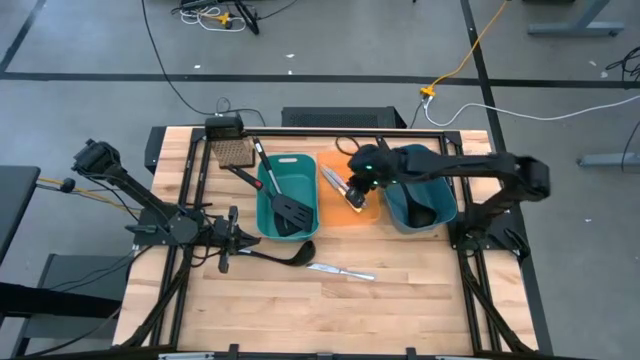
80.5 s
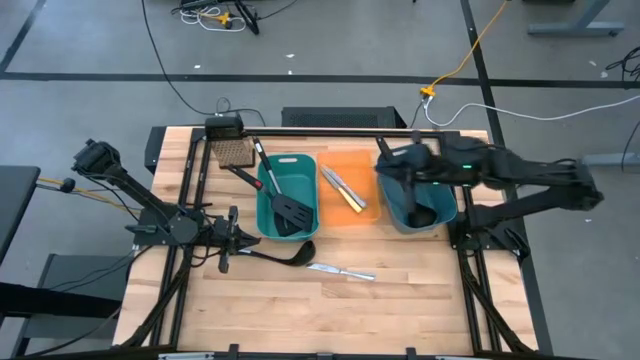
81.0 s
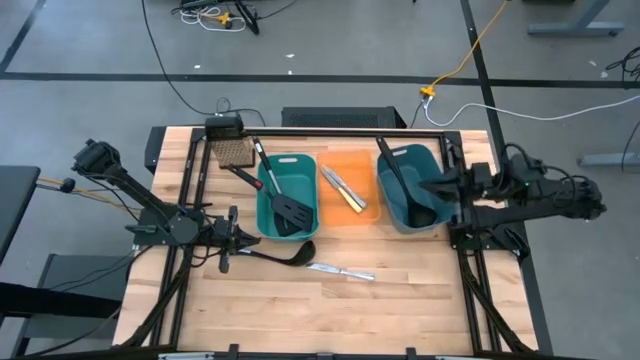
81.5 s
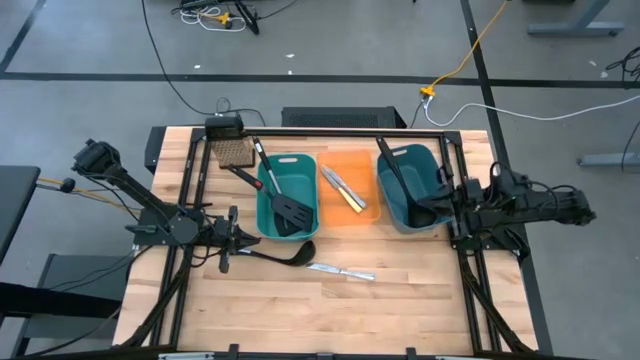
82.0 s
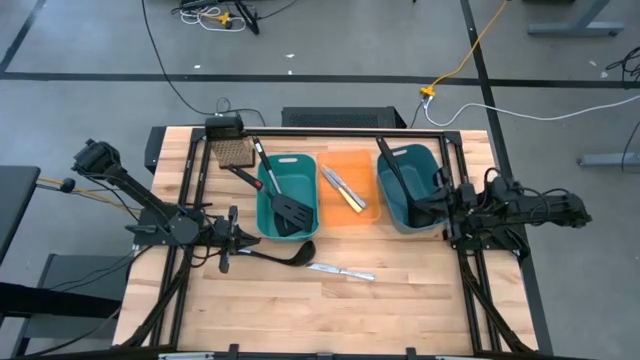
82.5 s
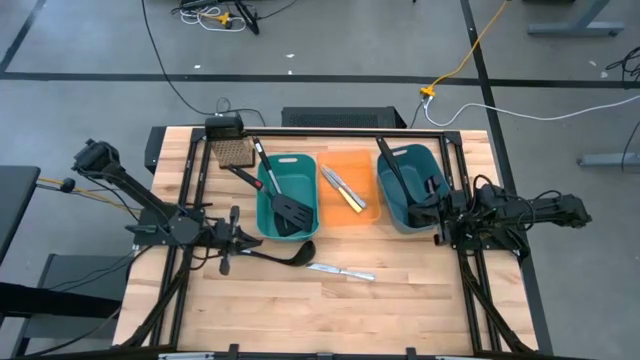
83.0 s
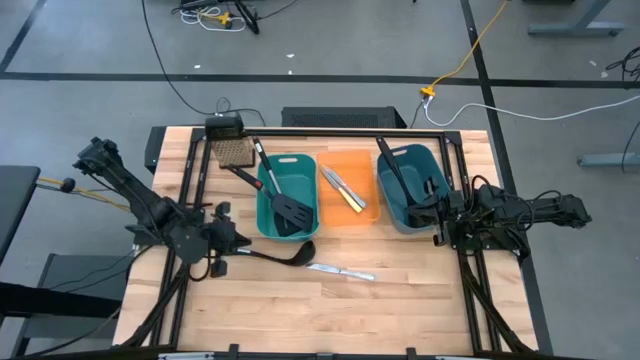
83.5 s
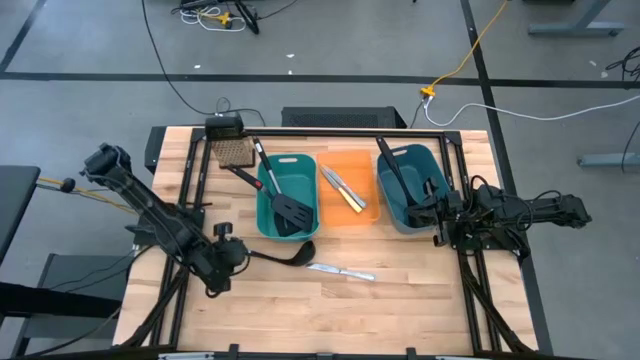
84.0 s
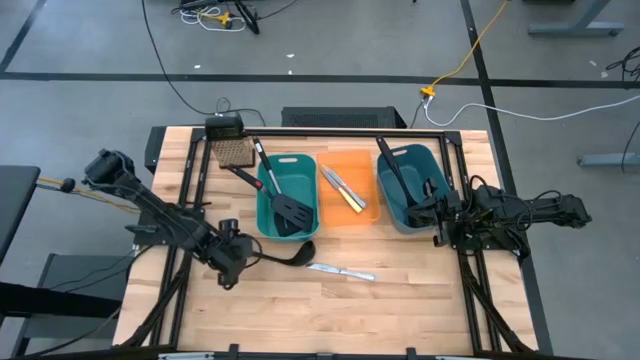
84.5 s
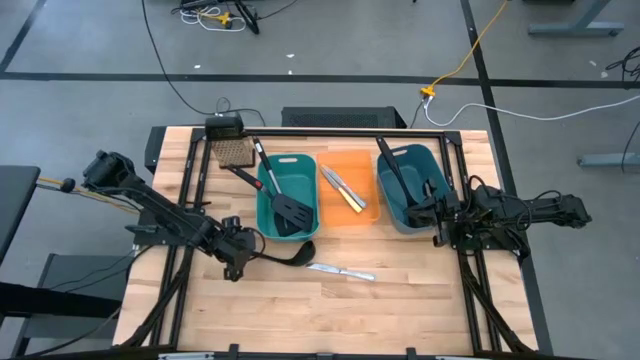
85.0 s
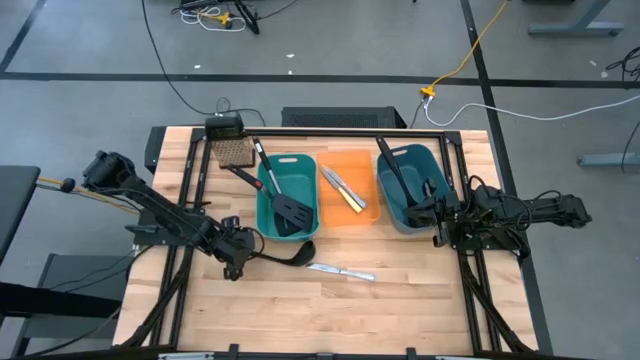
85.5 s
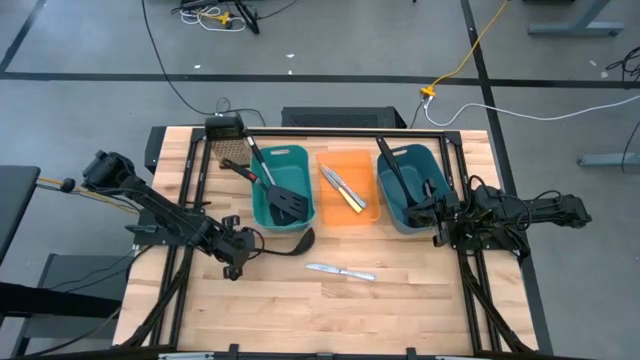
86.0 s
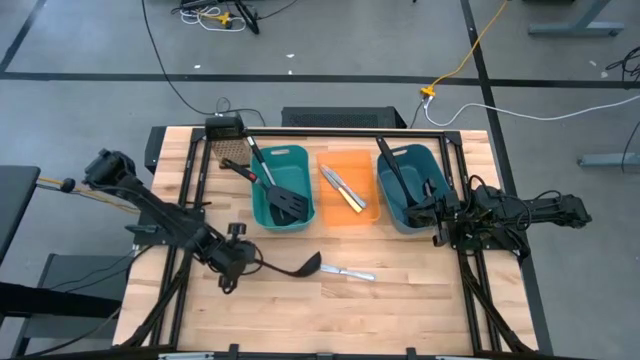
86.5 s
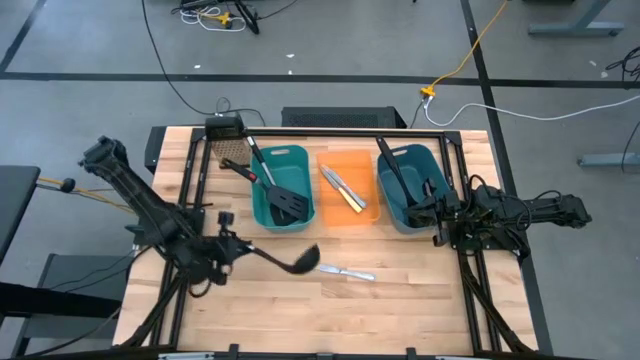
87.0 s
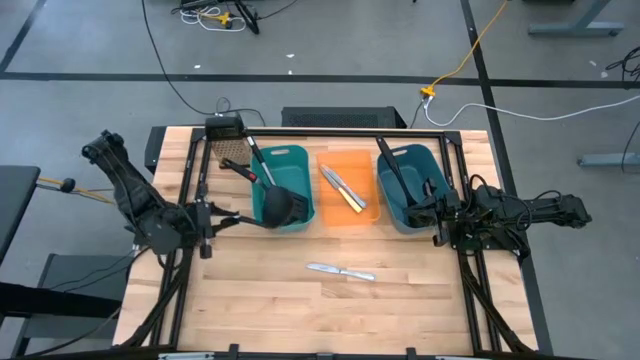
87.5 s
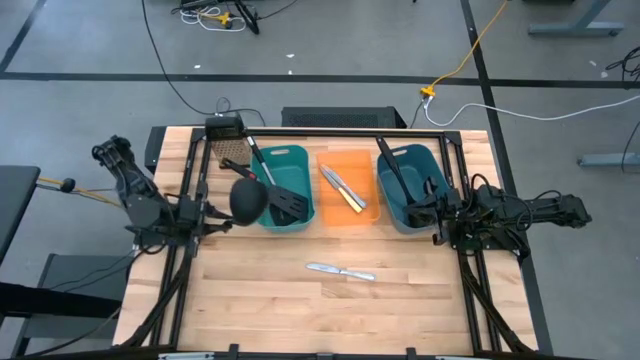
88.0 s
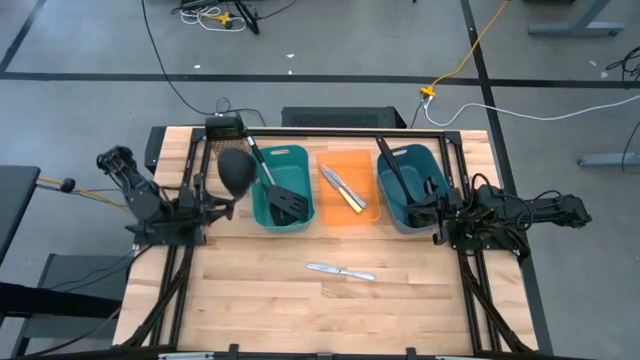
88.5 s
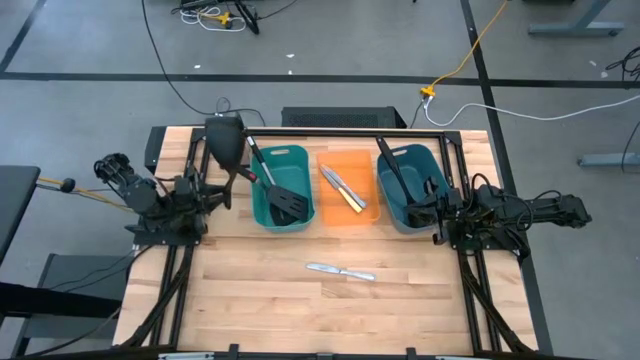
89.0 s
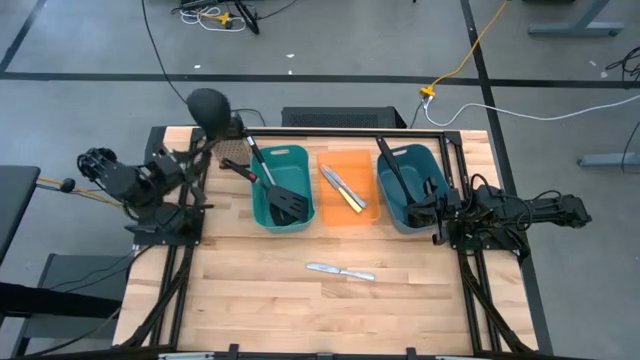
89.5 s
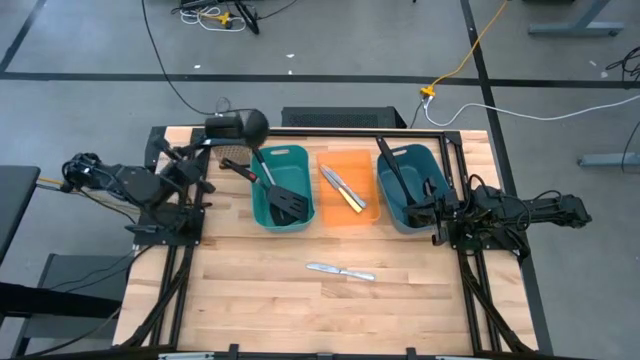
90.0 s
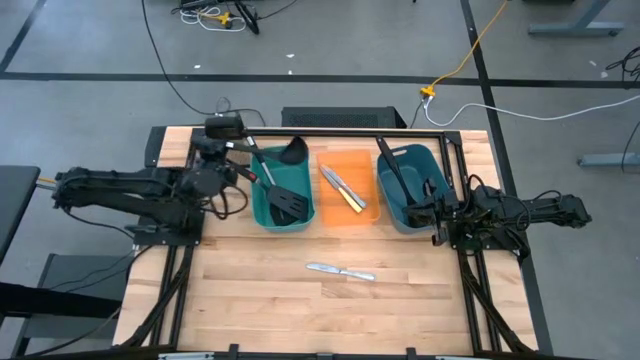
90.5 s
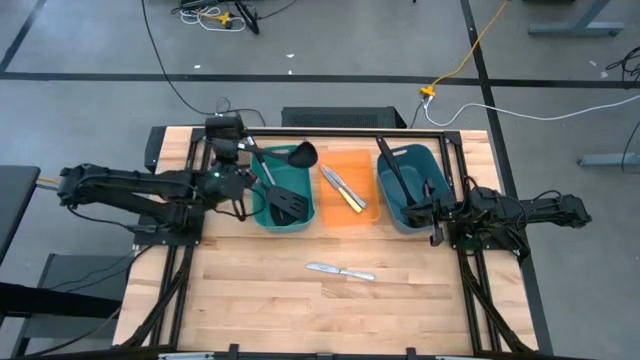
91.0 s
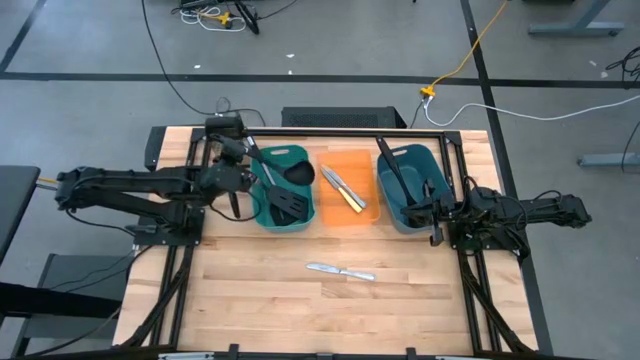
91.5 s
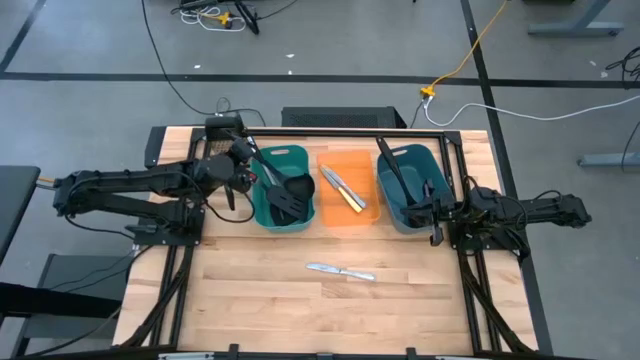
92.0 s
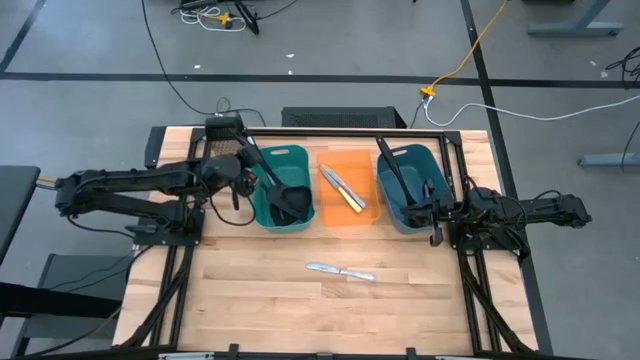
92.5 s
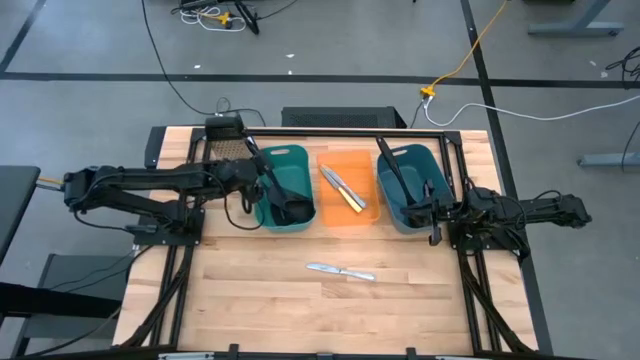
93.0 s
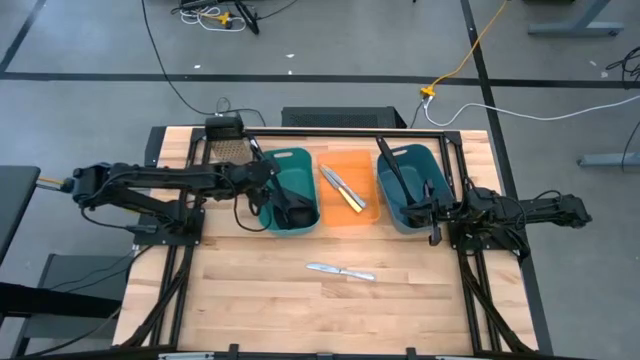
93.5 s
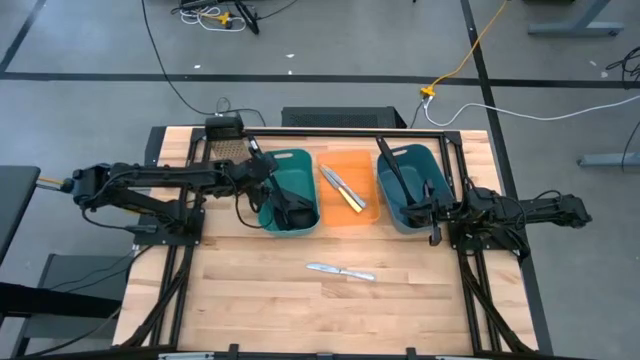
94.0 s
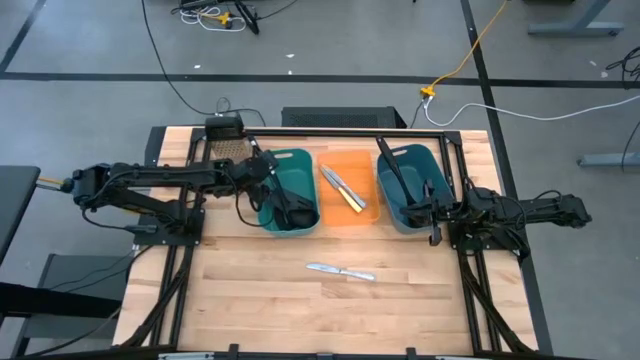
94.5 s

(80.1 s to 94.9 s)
Task: Pick & Place Kitchen Items
Put the black serving spoon into the dark green bin

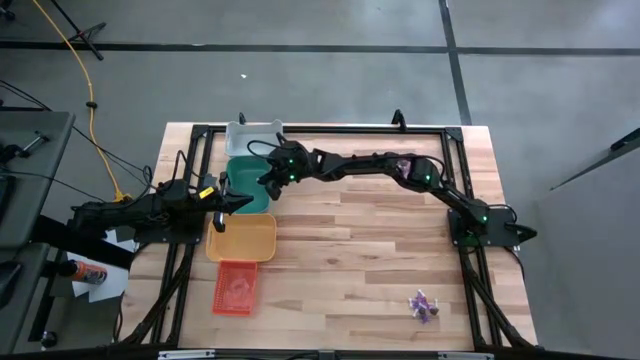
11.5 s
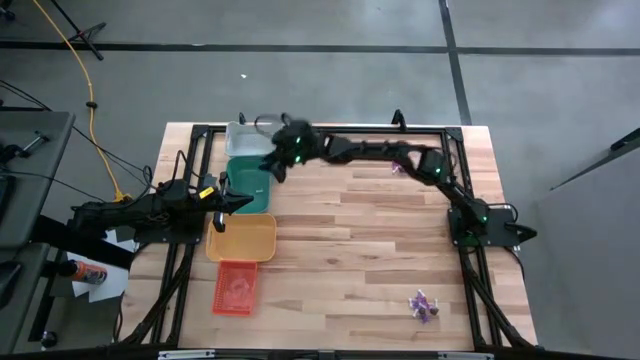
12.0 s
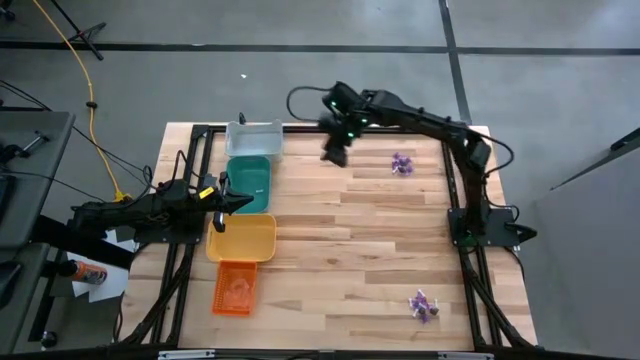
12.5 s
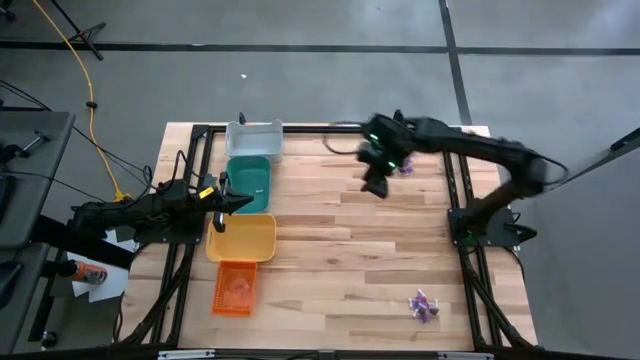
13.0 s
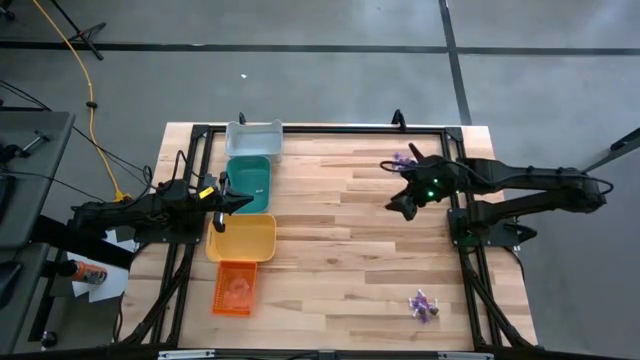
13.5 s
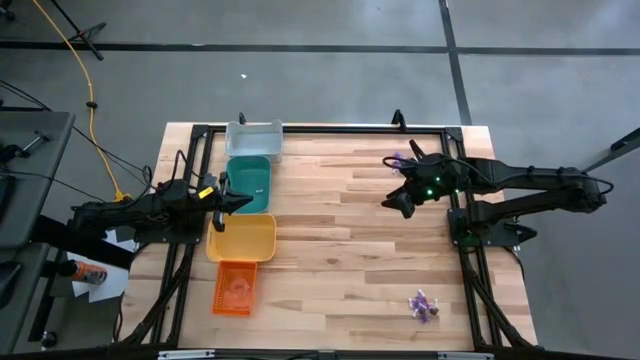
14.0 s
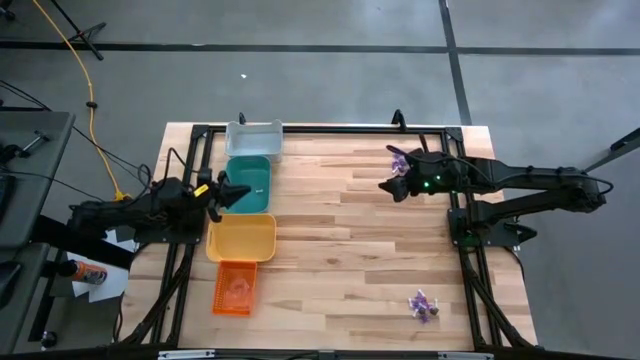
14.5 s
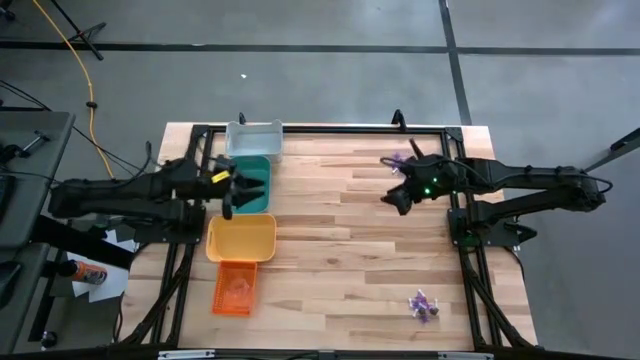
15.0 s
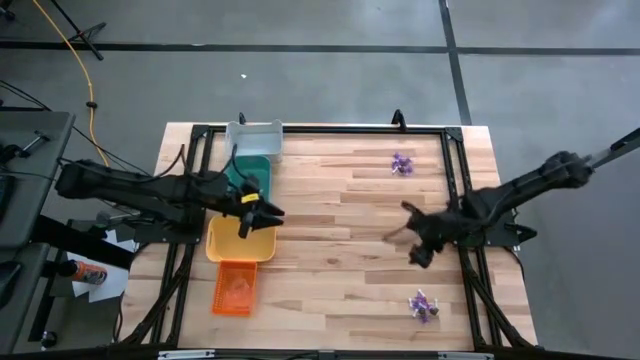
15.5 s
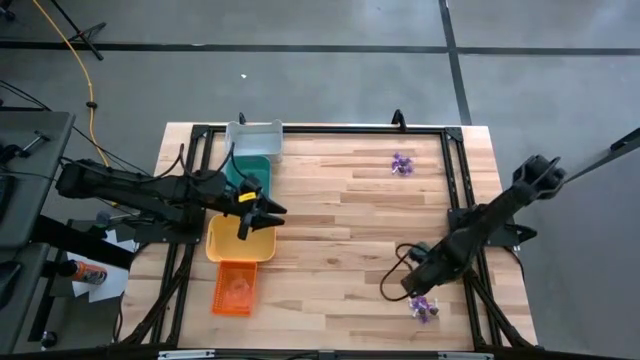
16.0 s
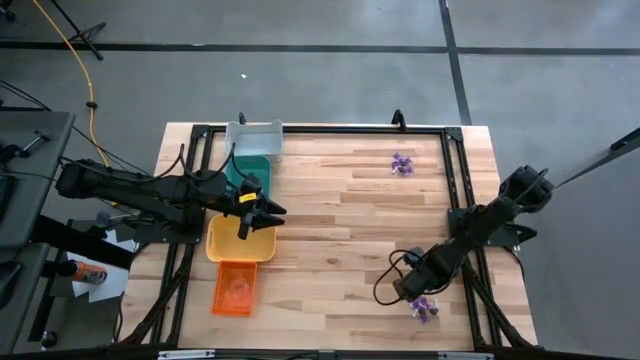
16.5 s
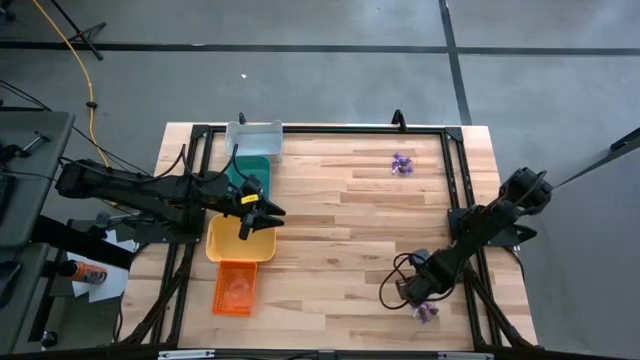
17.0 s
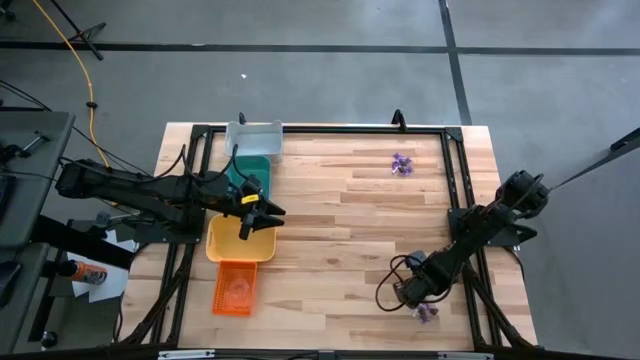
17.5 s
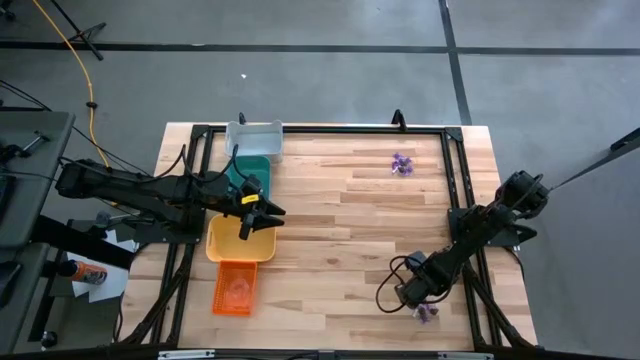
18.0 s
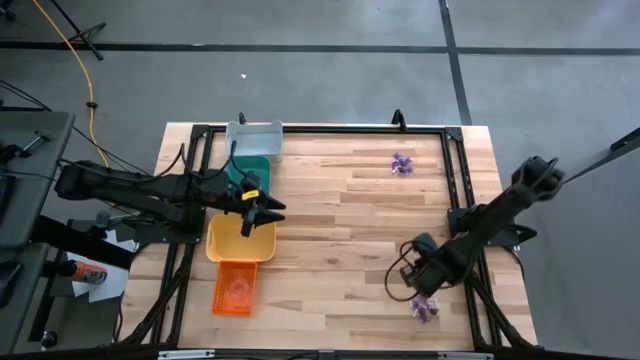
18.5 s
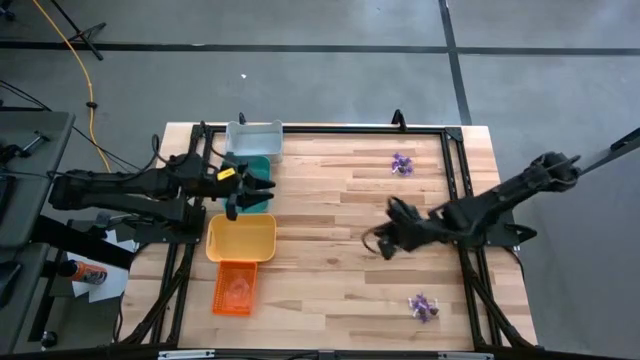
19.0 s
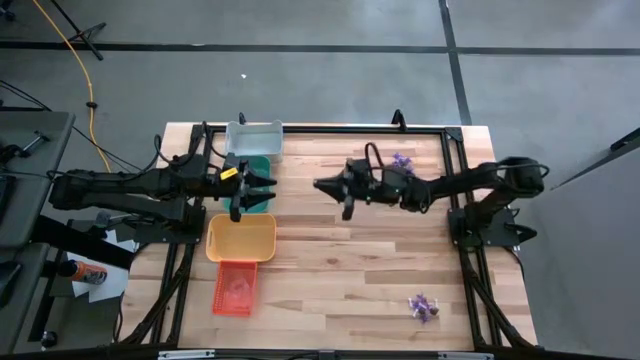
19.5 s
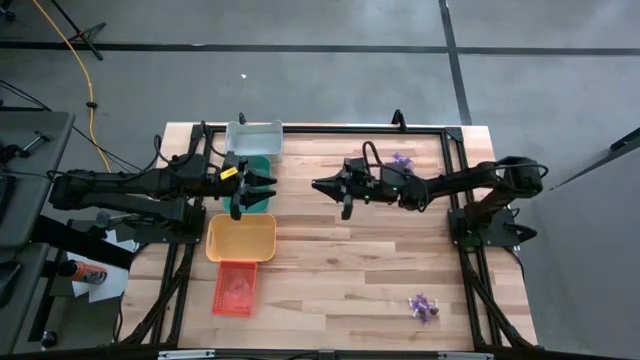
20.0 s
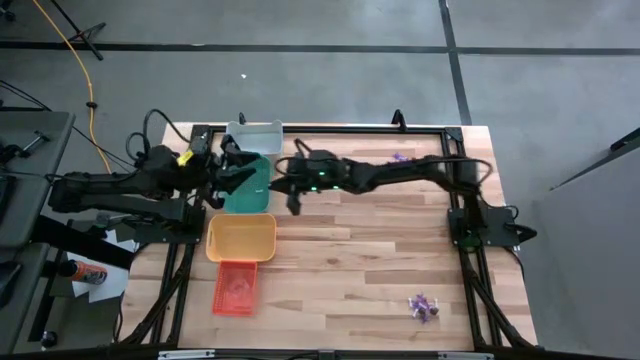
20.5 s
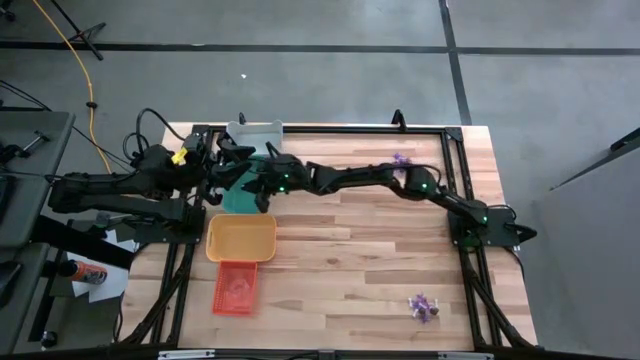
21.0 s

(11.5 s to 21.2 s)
Task: Sort Halloween decoration
Put the white bone toy in the green bin
